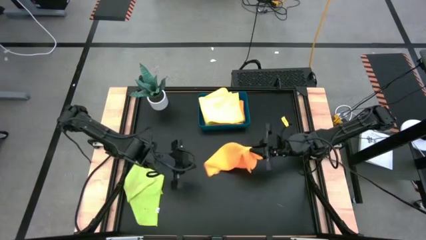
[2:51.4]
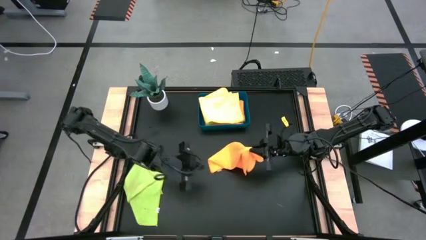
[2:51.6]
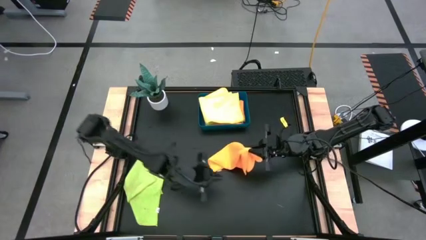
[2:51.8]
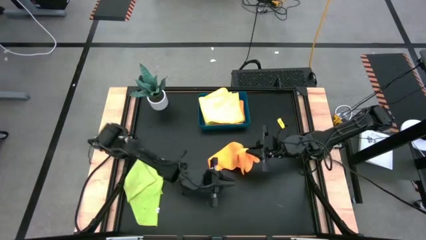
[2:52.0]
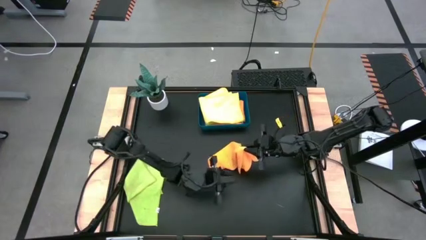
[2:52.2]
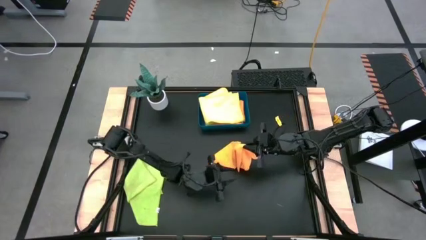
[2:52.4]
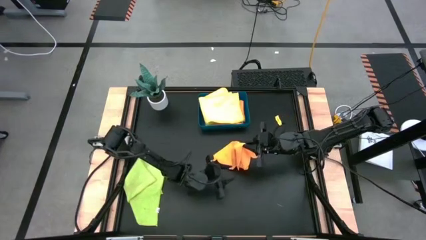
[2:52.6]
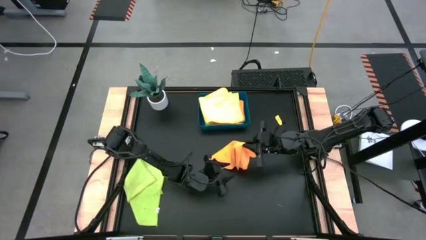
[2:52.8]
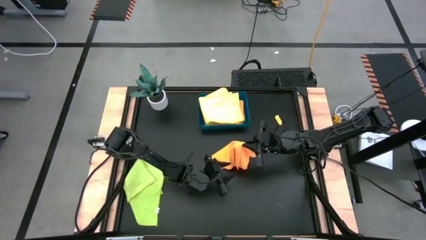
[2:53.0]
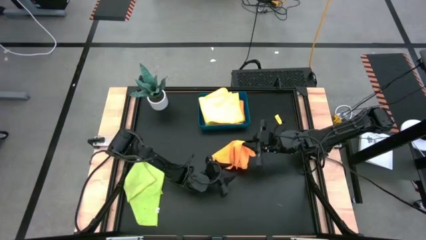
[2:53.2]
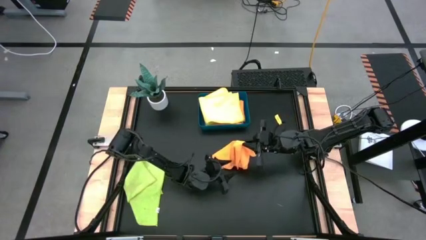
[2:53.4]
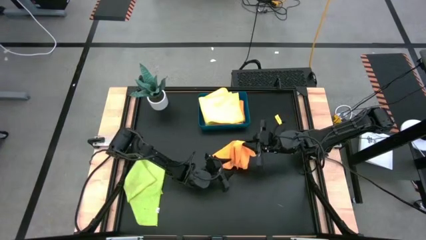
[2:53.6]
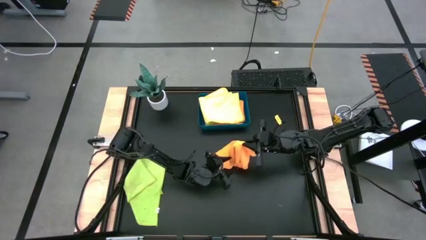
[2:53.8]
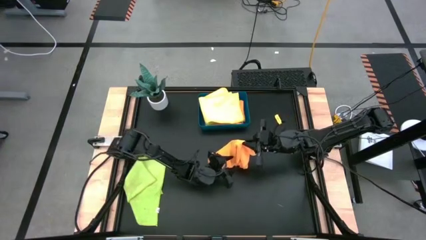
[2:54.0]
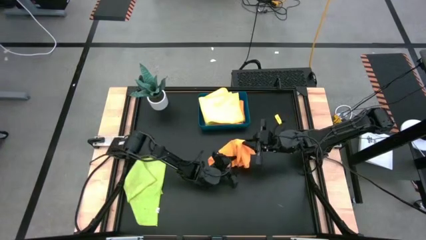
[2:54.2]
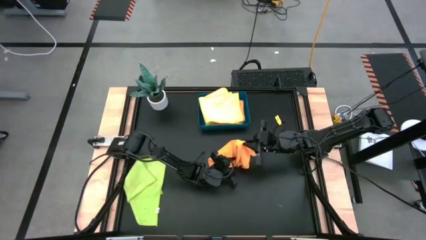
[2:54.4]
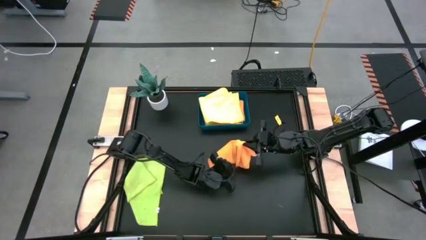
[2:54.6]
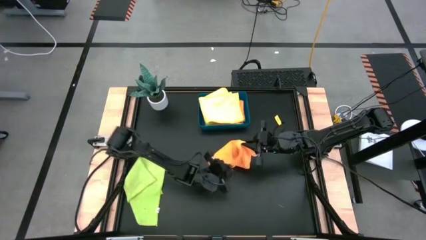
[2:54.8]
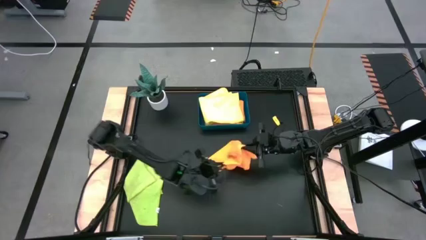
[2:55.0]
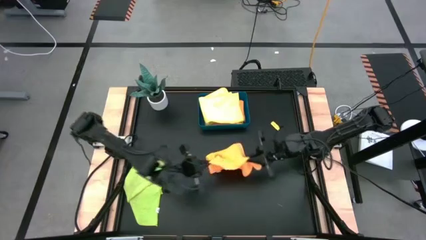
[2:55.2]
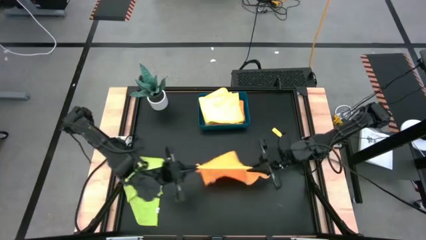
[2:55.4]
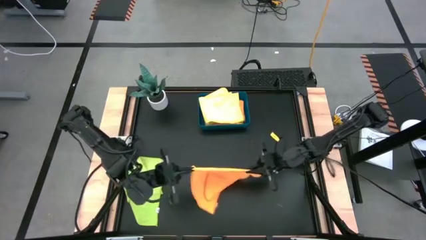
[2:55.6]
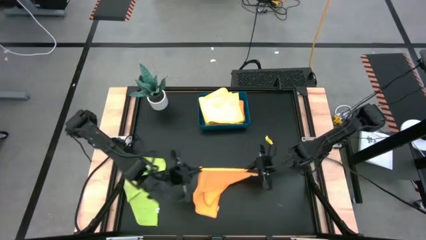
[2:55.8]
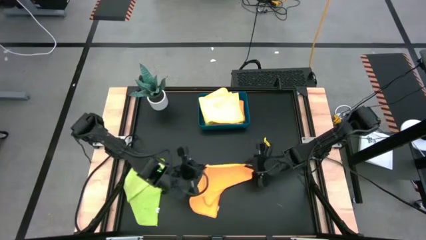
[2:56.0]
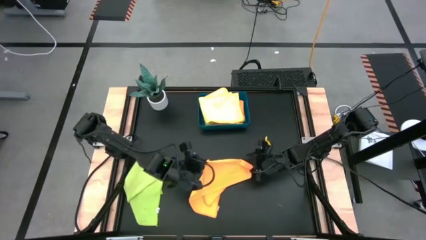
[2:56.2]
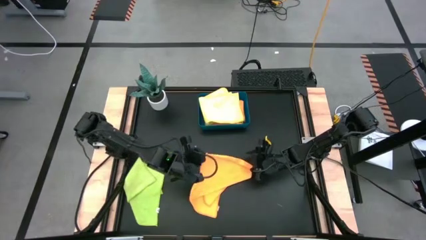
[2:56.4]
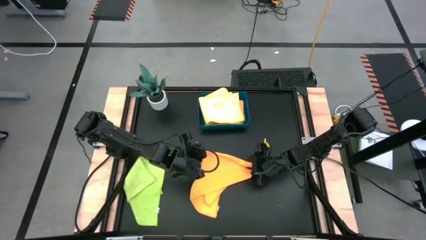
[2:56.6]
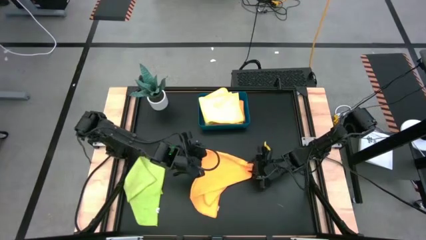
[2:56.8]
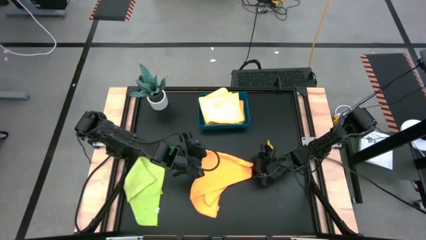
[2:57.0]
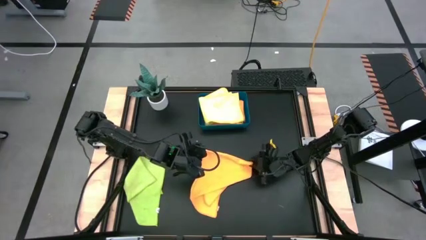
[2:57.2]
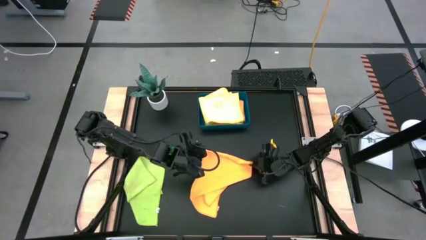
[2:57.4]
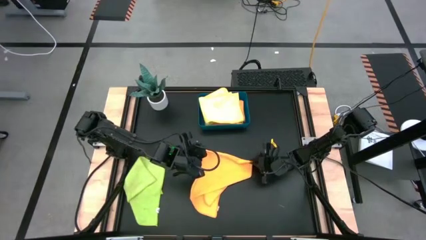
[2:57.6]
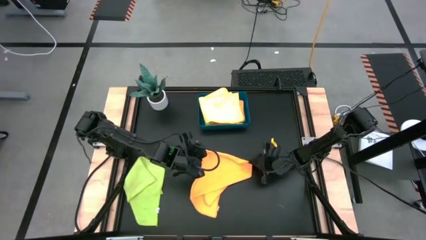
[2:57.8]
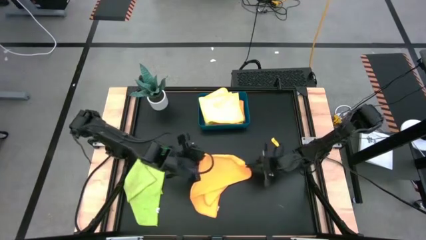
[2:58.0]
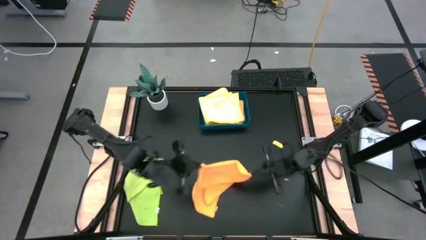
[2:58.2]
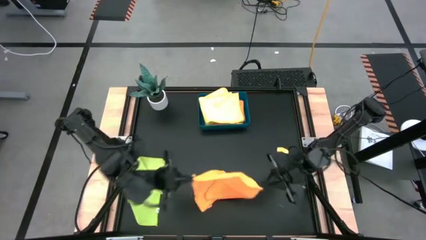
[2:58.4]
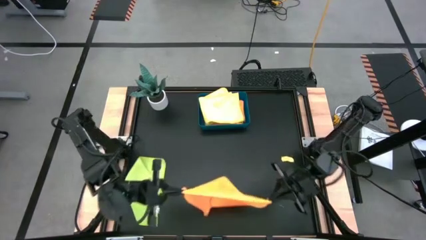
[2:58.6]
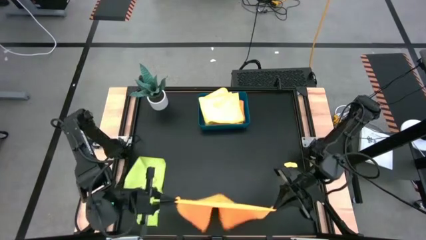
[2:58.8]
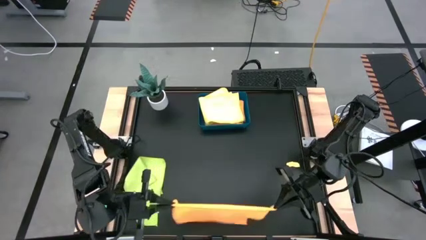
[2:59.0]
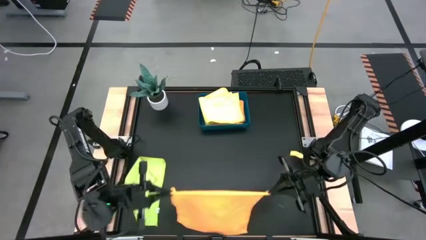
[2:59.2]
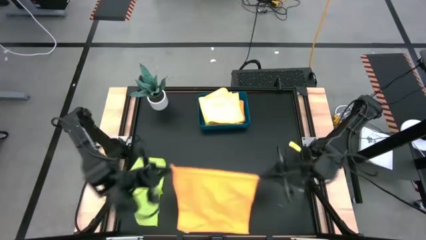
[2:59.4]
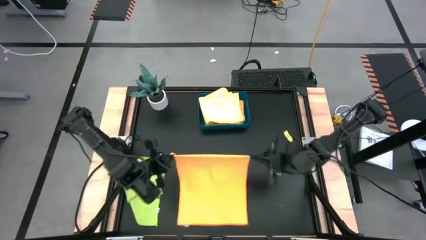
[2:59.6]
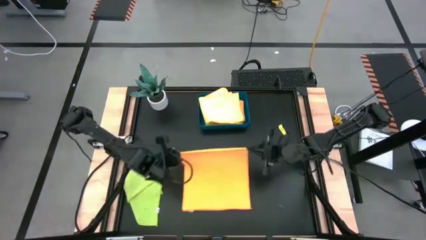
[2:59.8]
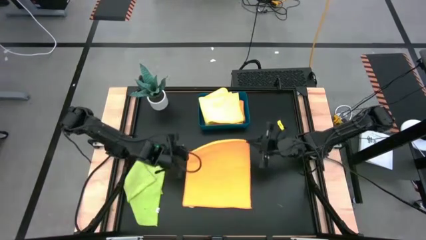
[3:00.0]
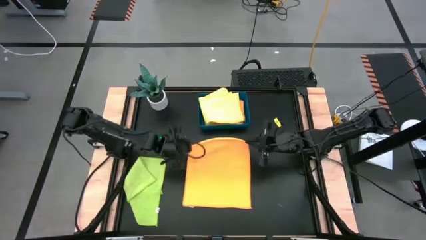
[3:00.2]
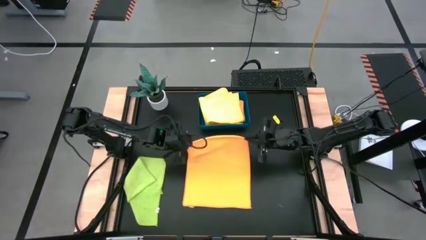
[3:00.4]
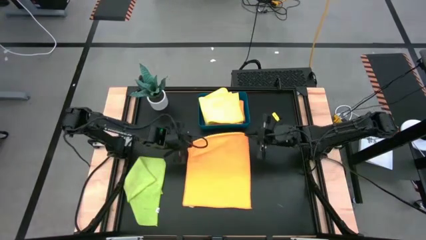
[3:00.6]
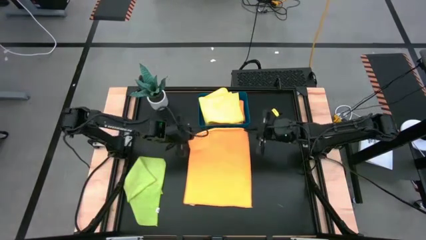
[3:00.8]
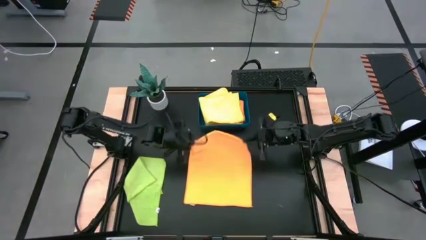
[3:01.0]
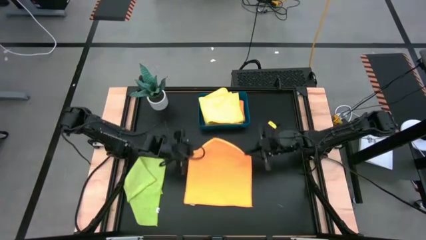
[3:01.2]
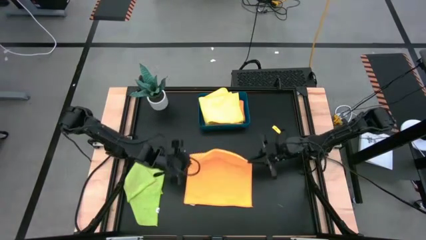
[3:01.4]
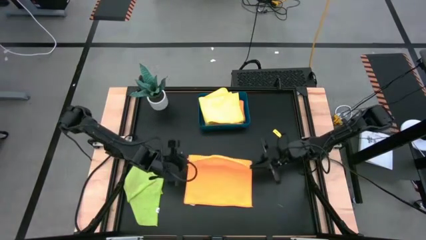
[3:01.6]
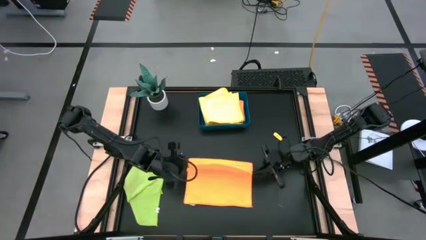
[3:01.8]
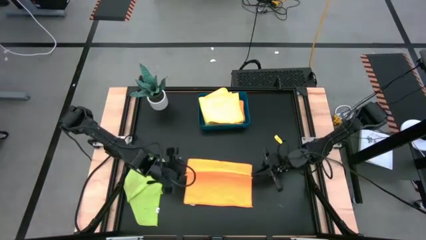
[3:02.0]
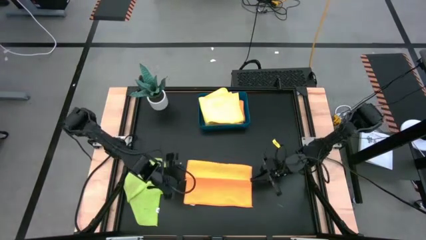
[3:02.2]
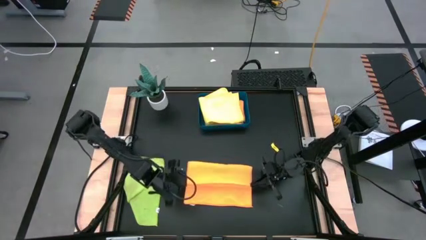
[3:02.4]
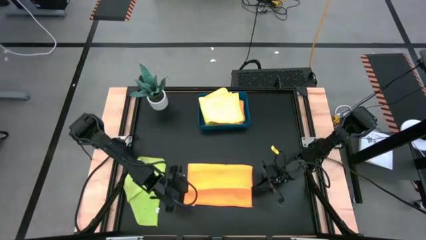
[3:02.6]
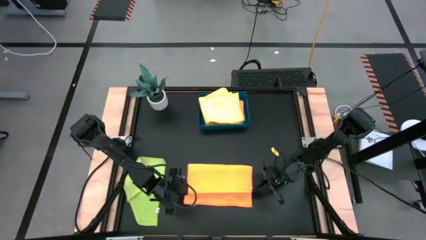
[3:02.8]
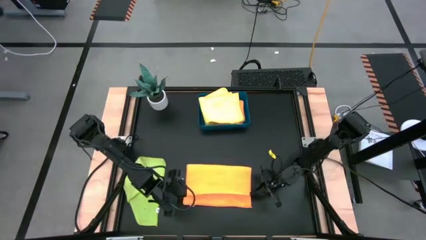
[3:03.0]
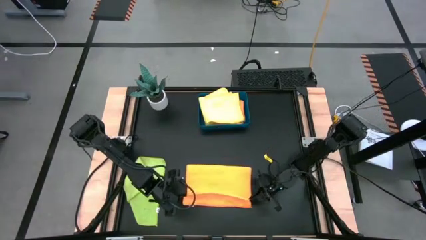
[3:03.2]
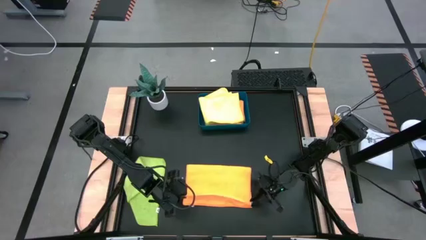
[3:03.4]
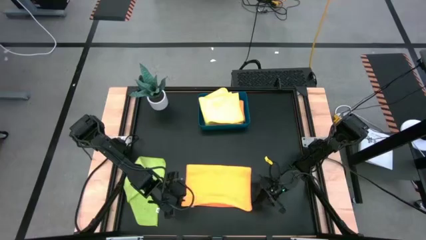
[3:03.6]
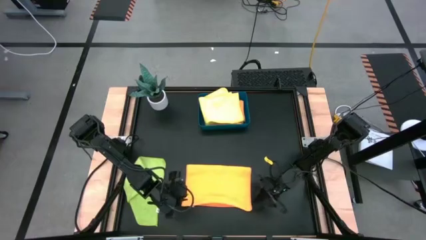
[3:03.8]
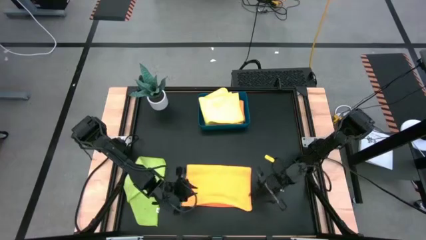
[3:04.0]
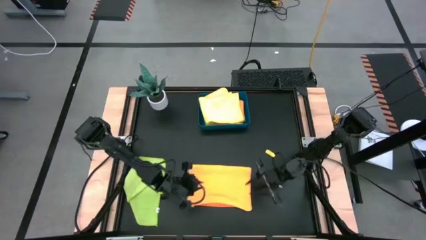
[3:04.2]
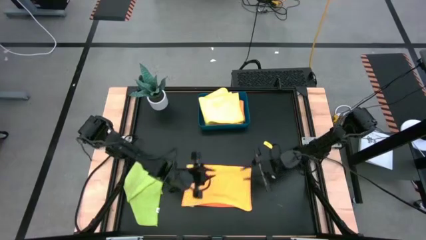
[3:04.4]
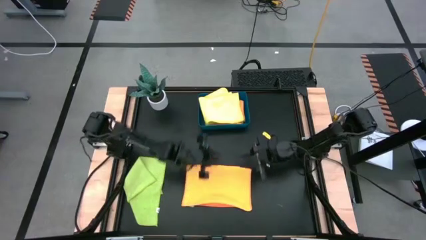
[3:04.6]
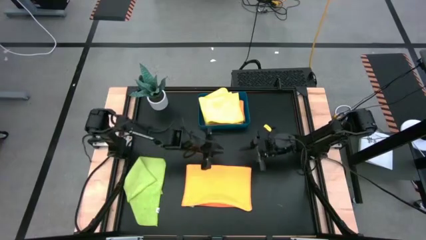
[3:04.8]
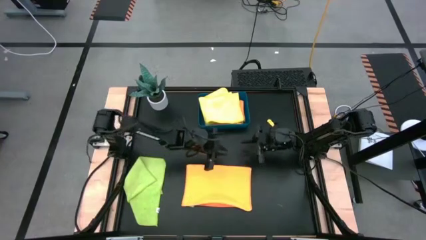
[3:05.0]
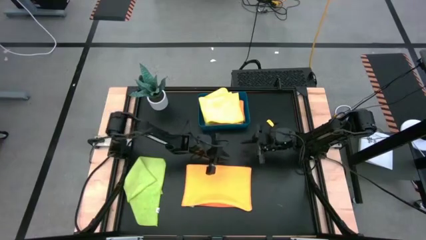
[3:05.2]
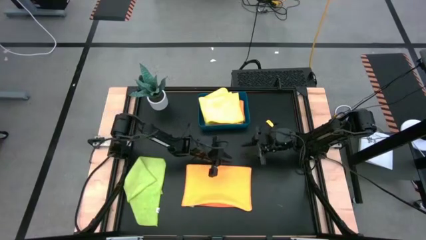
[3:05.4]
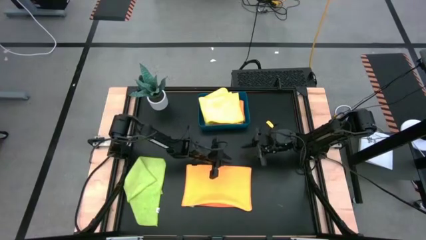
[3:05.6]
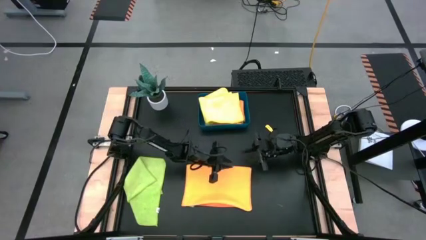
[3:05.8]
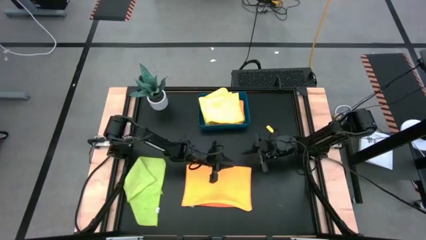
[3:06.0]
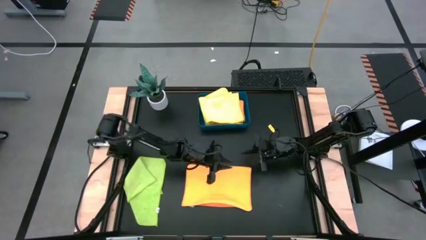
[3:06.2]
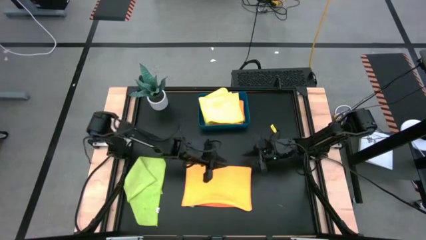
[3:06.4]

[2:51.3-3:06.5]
Task: Fold microfiber towels
Fold the orange microfiber cloth
